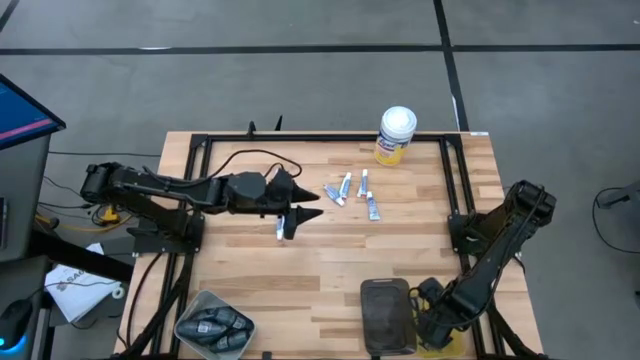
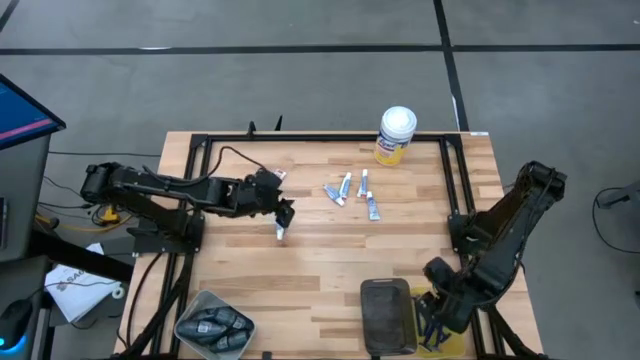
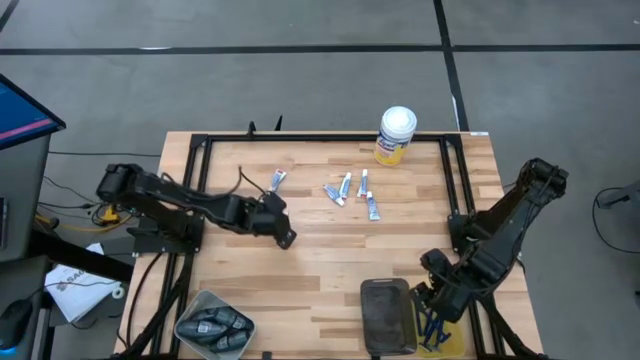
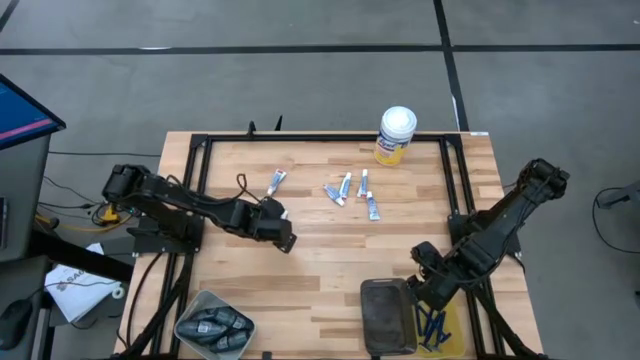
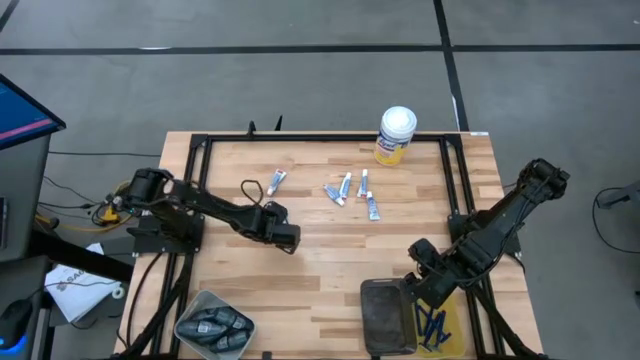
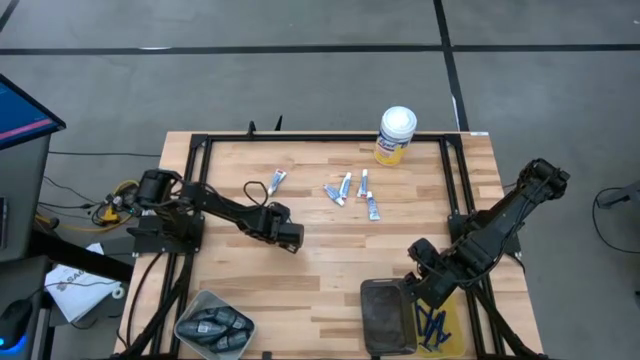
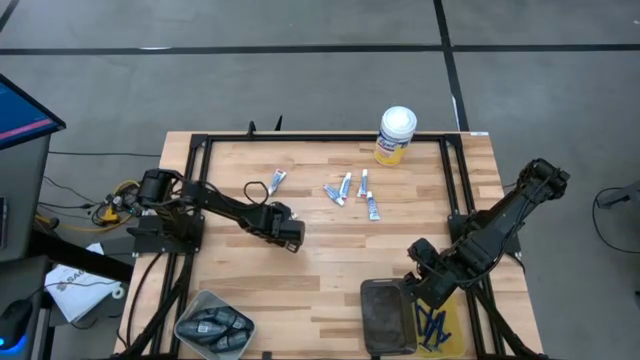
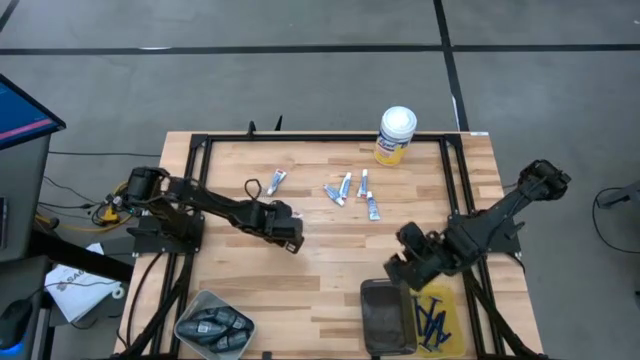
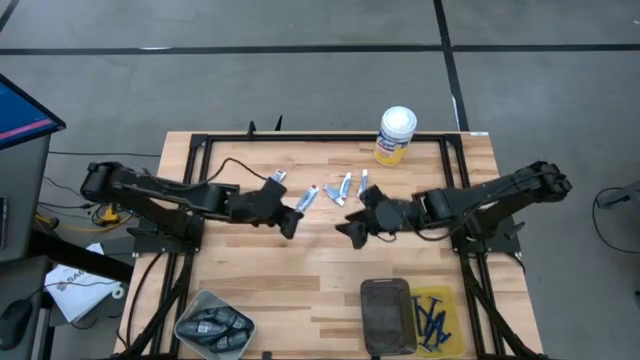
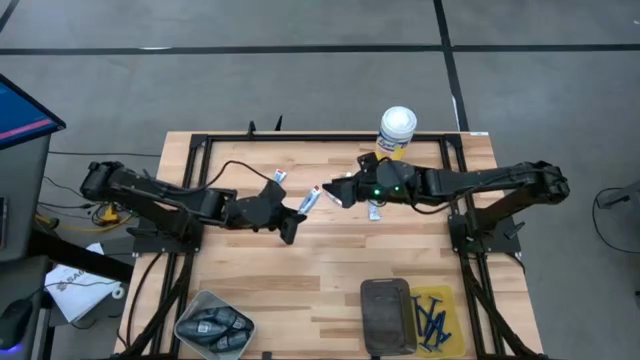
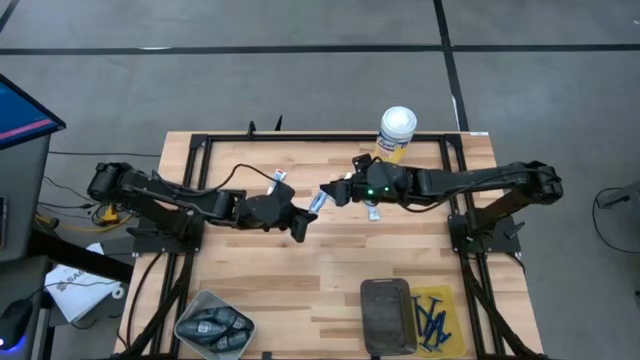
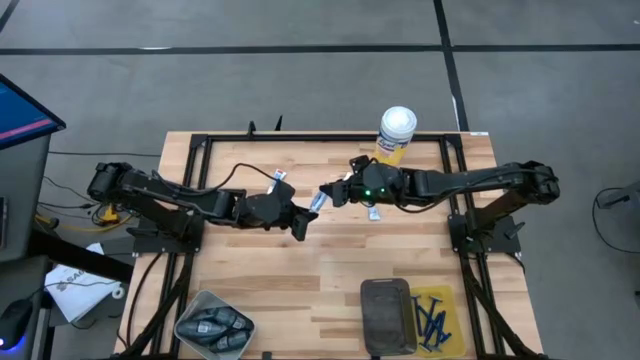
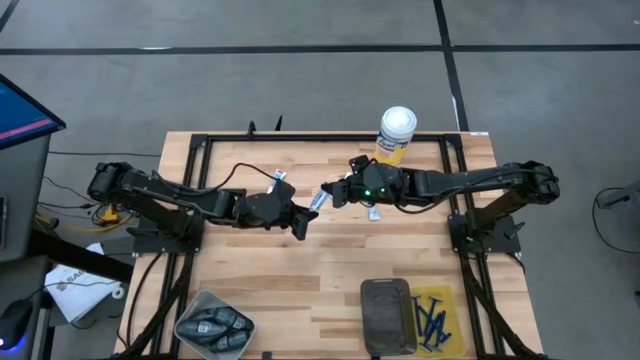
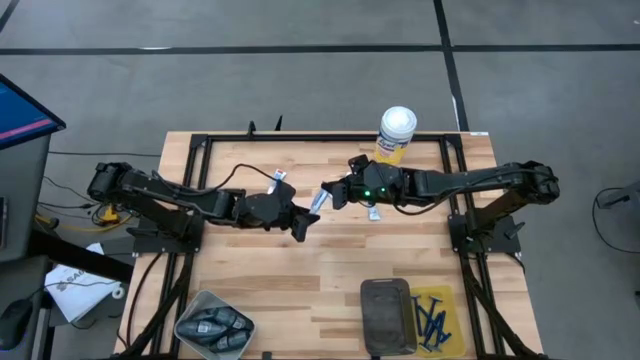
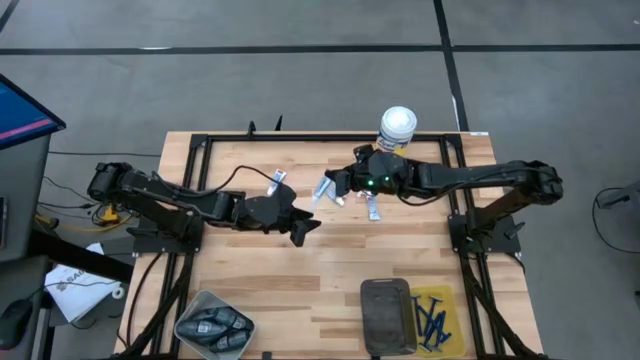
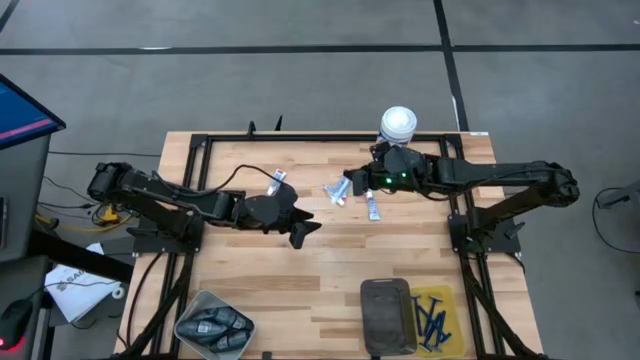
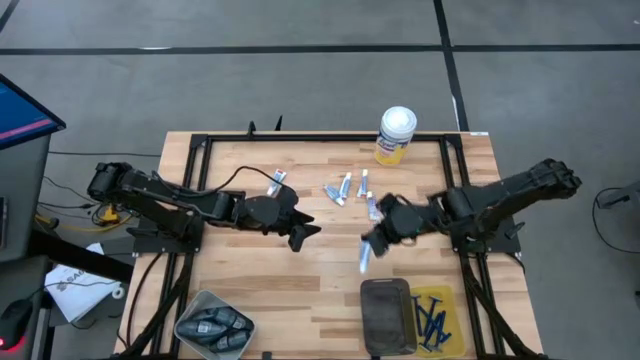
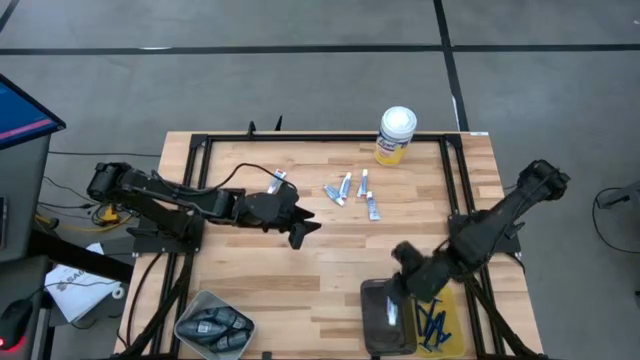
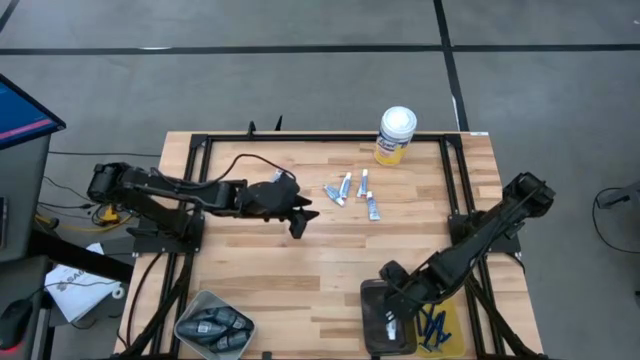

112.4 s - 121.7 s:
Task: Pick & Place Travel size toiletries
Put the toothpaste into the black bin

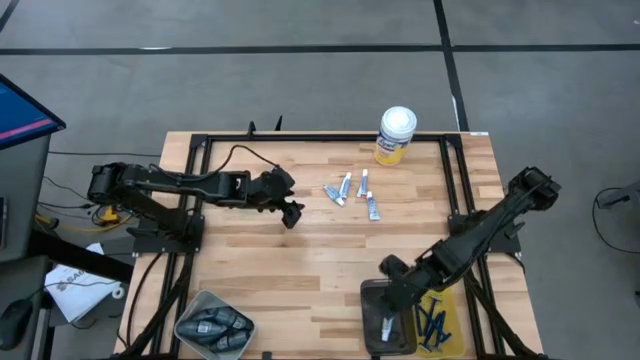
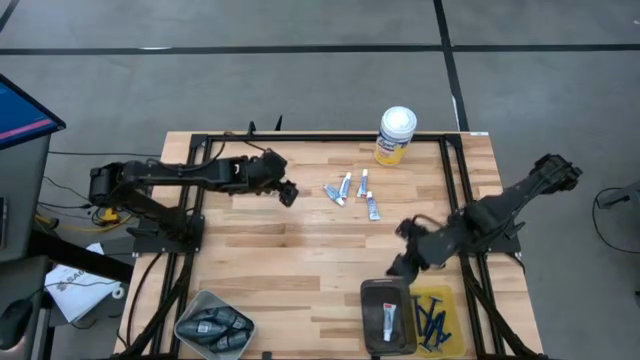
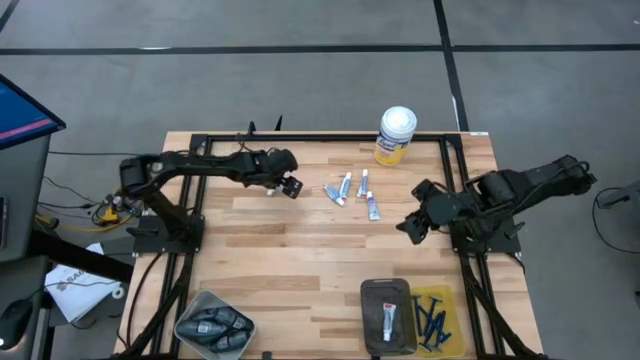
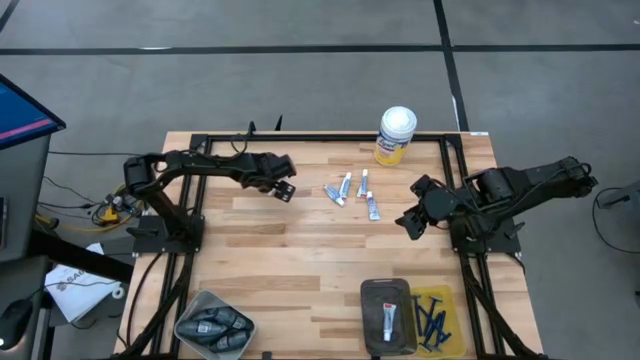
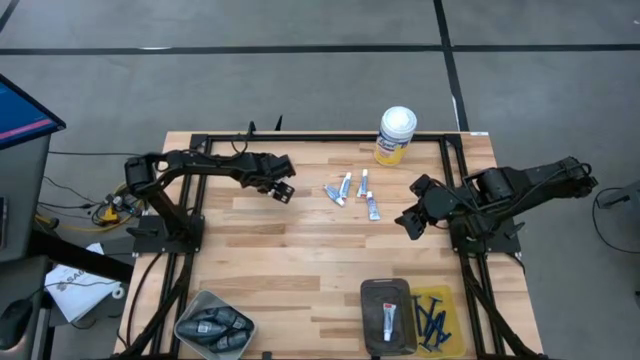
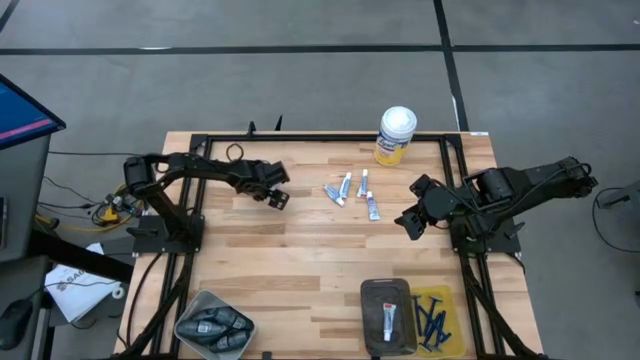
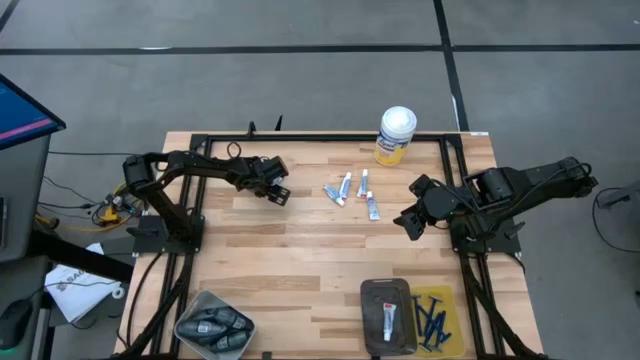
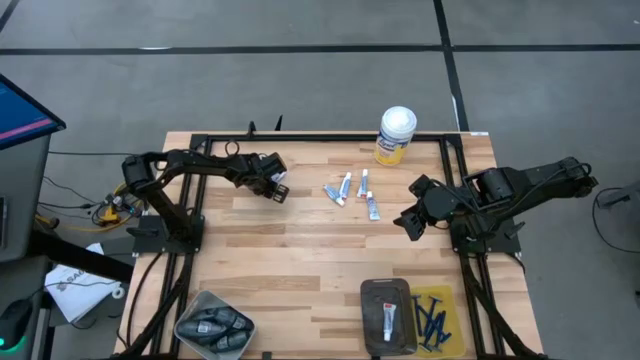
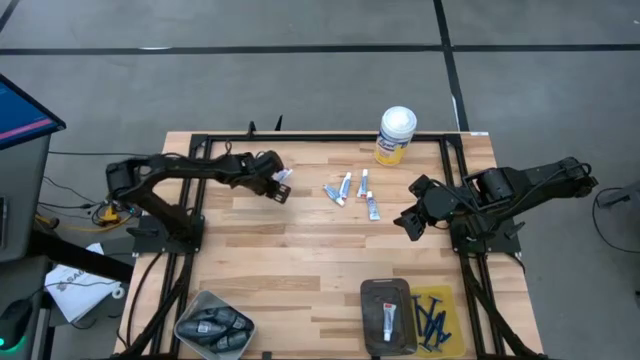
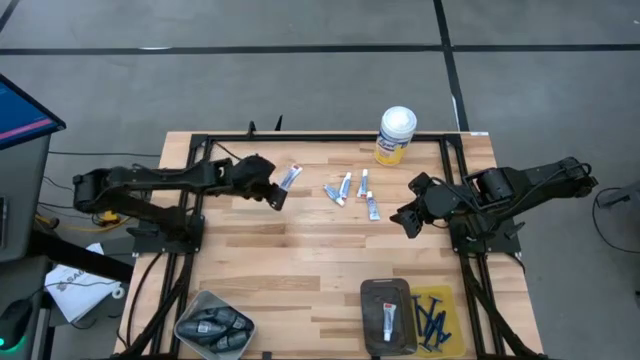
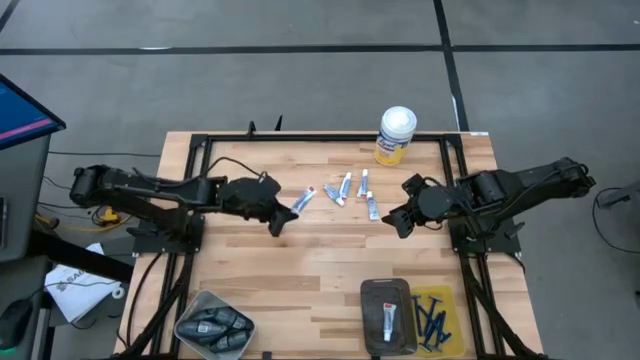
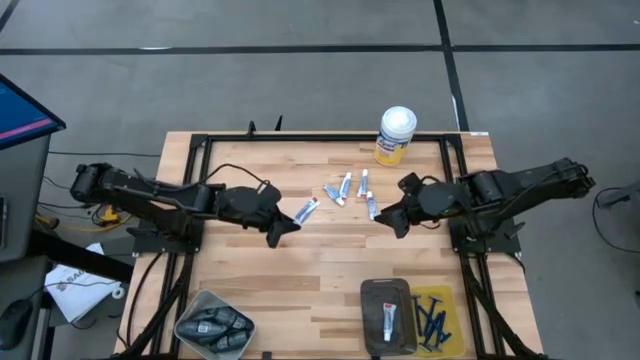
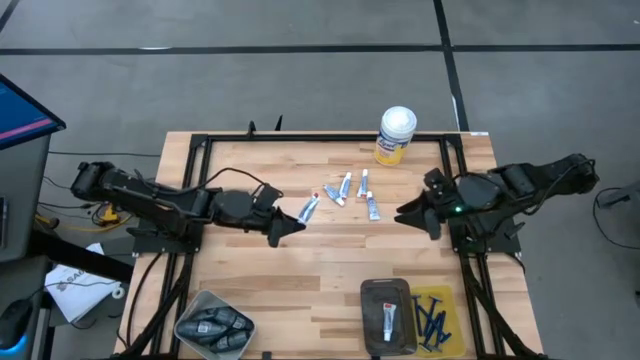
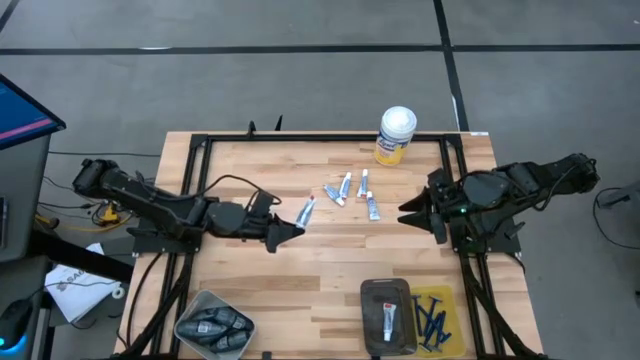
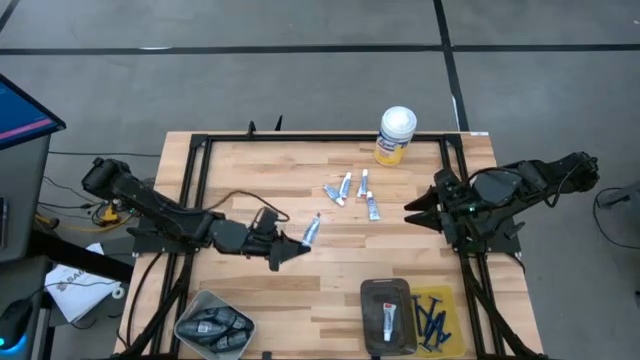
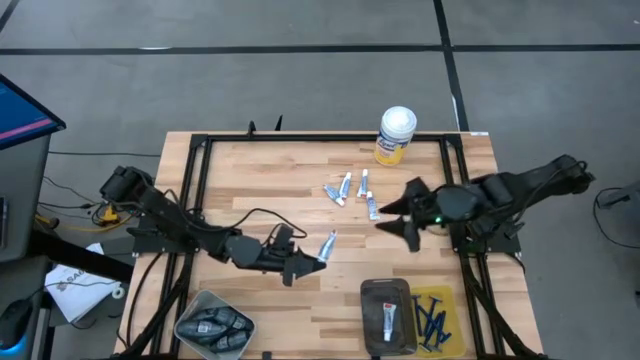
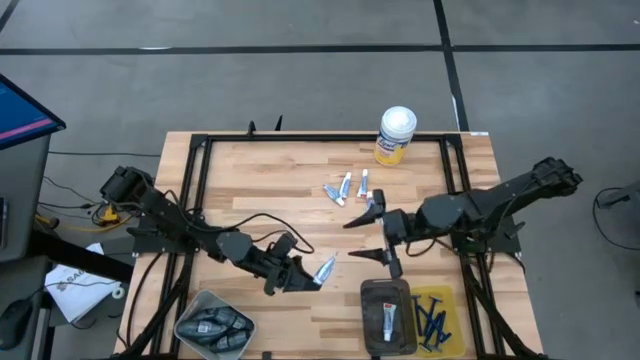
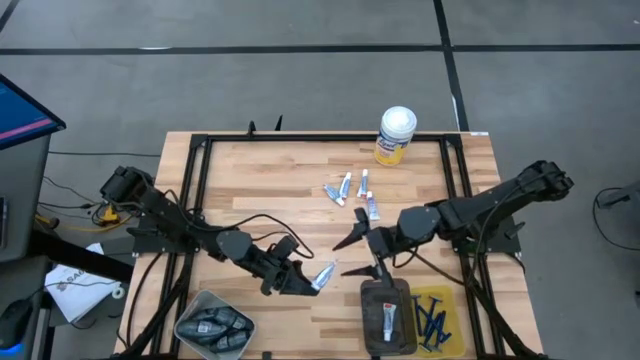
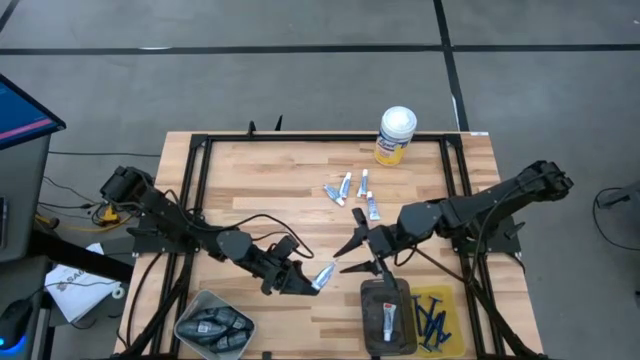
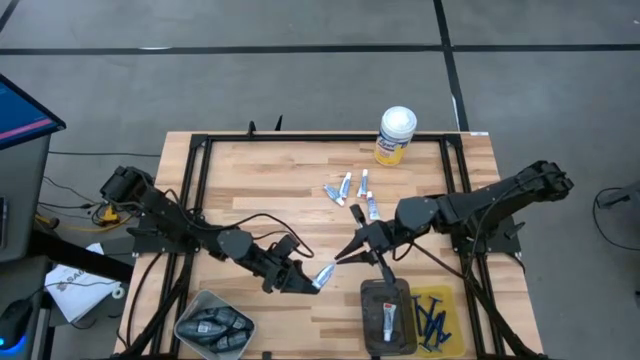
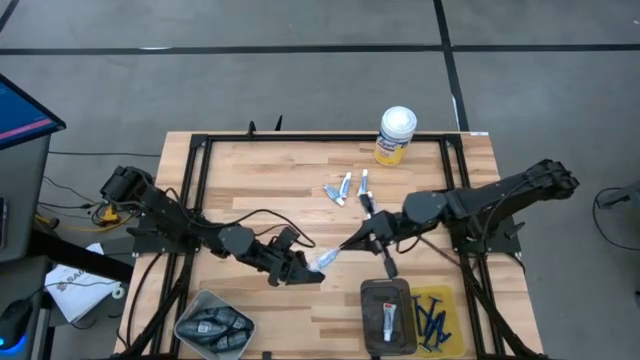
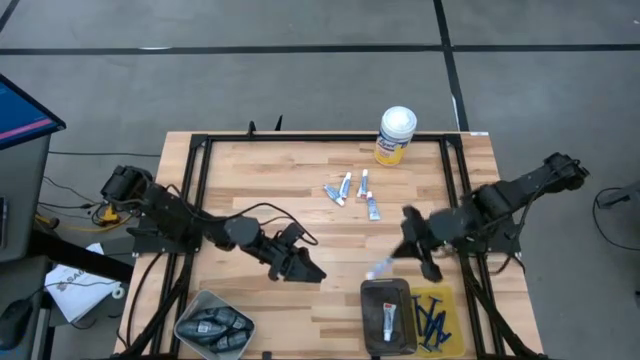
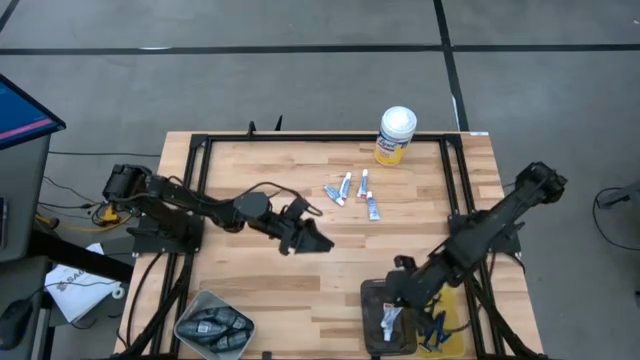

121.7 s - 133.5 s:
Put the toothpaste into the black bin

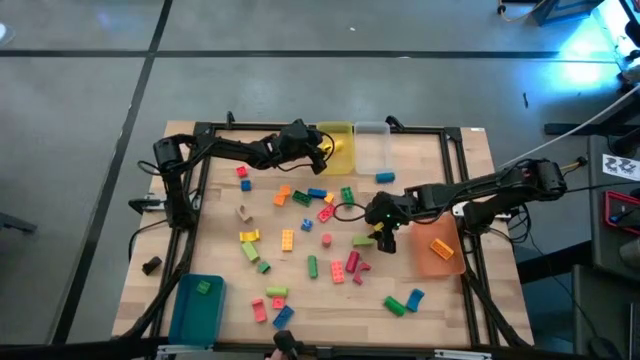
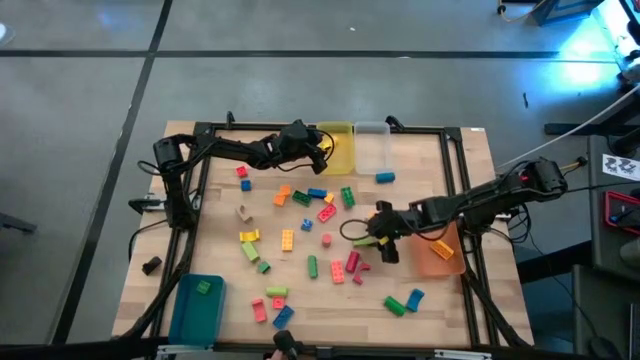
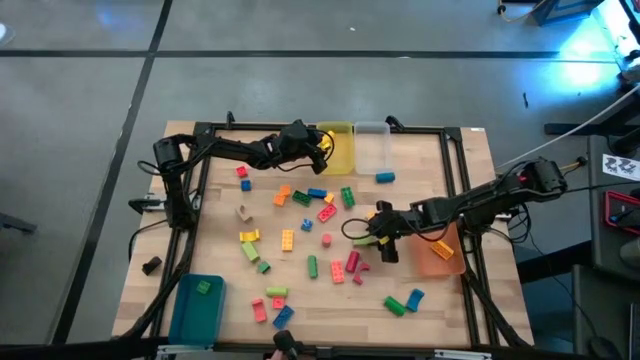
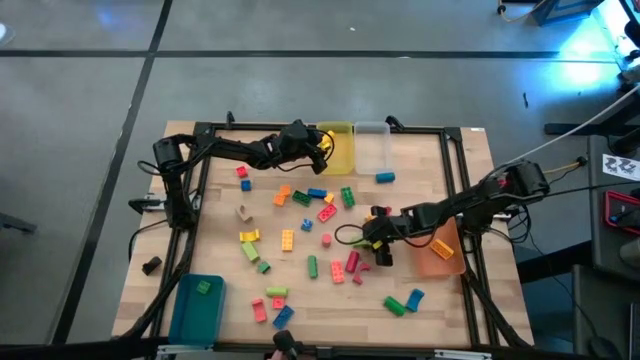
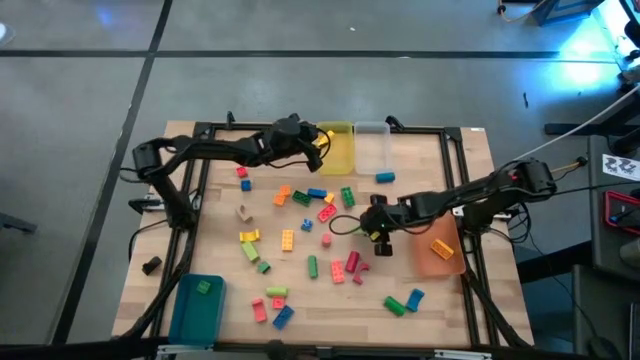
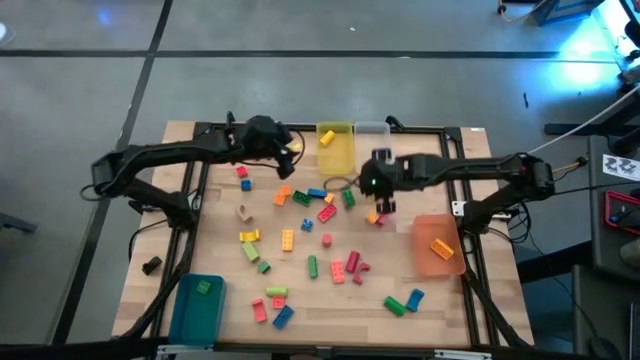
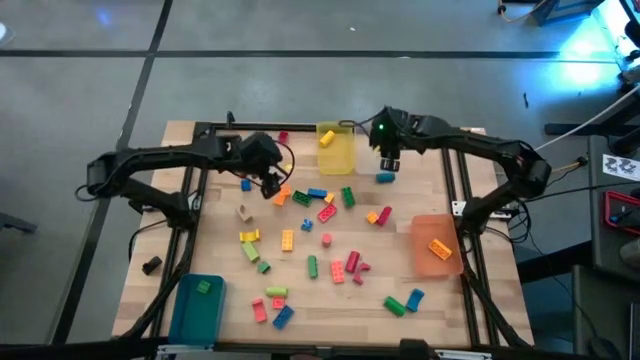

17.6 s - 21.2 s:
Task: Sort blocks by size
Put the green arch block into the transparent bin
